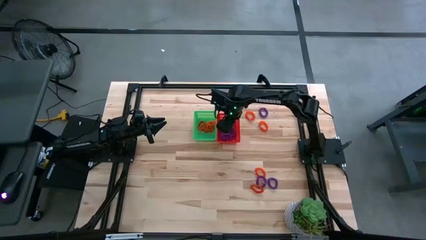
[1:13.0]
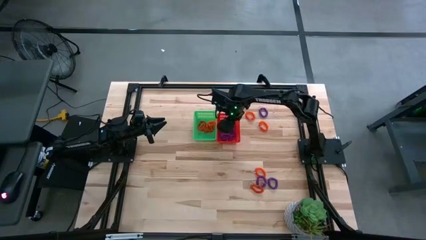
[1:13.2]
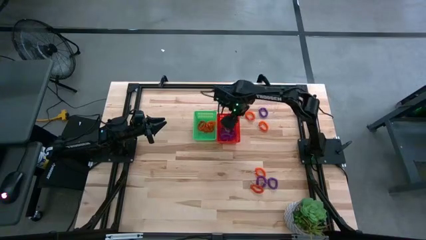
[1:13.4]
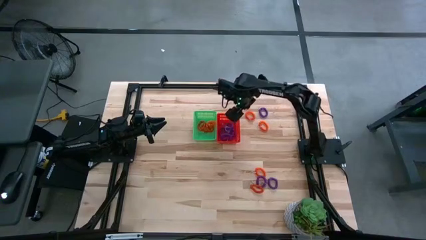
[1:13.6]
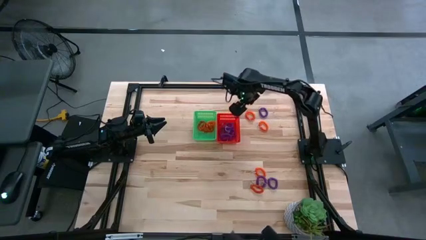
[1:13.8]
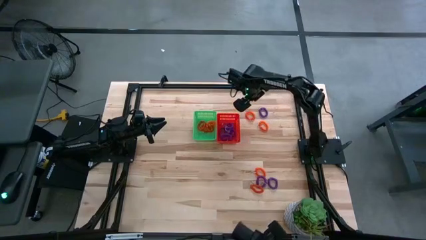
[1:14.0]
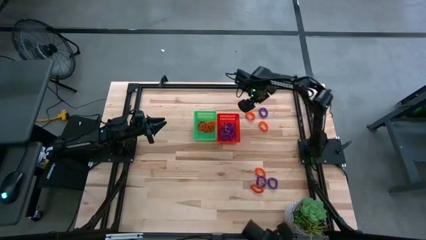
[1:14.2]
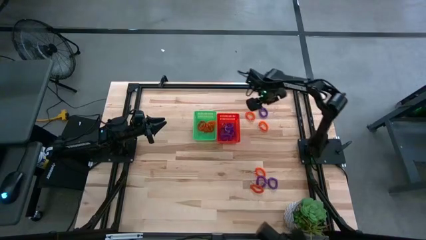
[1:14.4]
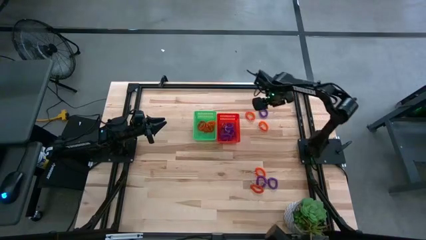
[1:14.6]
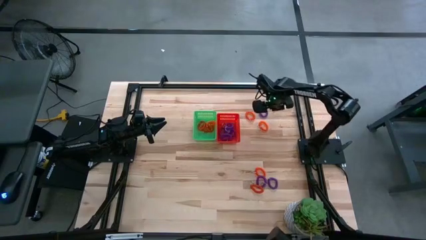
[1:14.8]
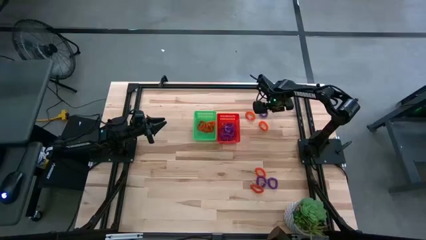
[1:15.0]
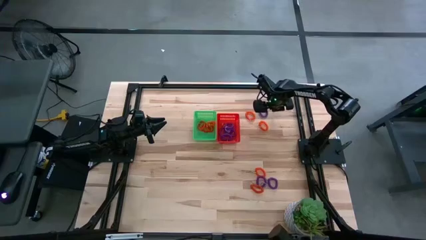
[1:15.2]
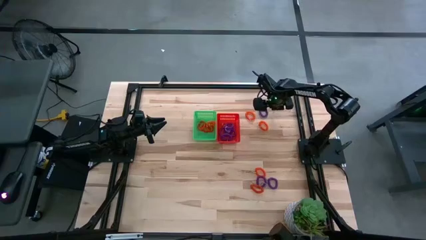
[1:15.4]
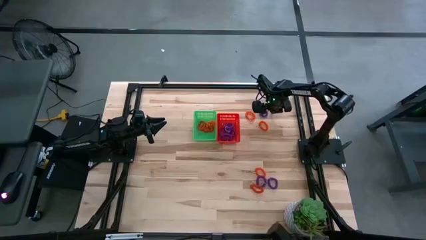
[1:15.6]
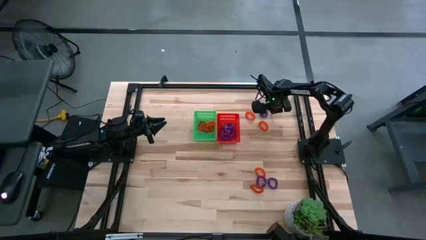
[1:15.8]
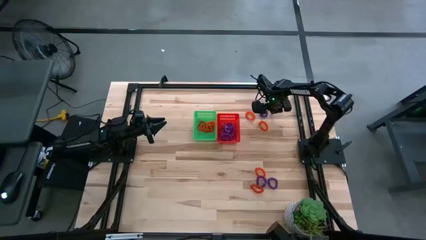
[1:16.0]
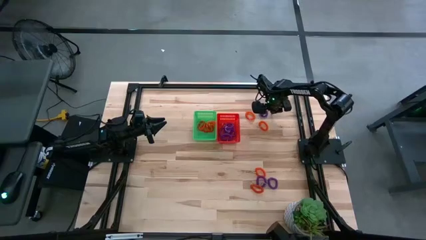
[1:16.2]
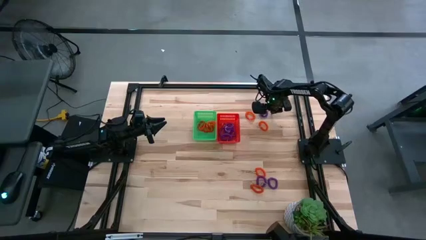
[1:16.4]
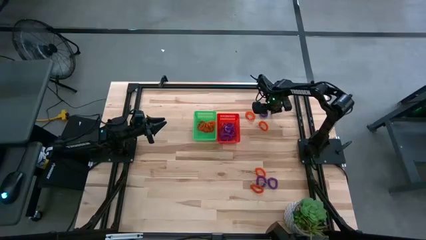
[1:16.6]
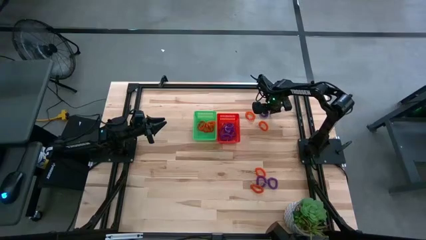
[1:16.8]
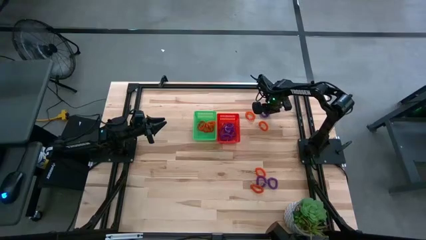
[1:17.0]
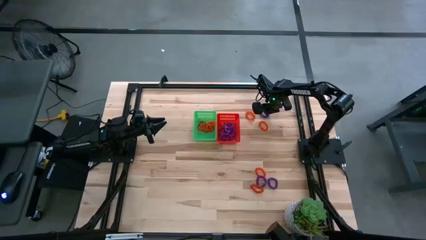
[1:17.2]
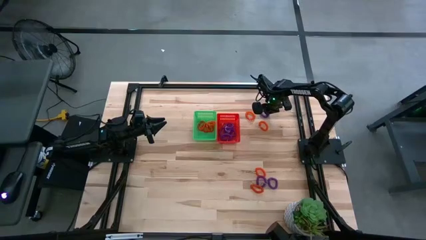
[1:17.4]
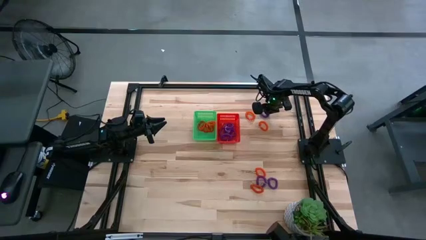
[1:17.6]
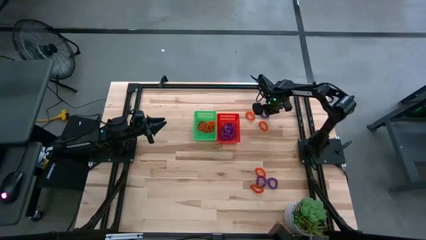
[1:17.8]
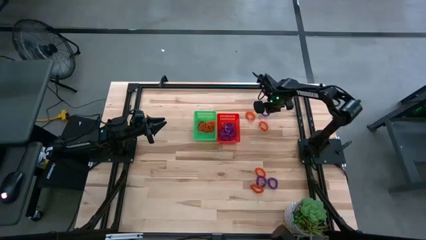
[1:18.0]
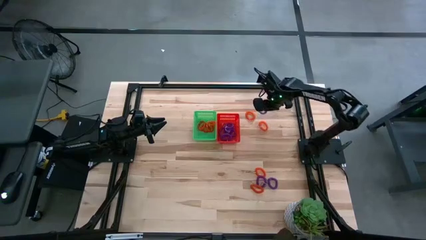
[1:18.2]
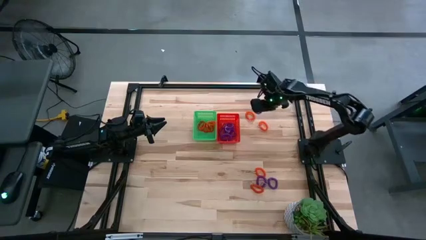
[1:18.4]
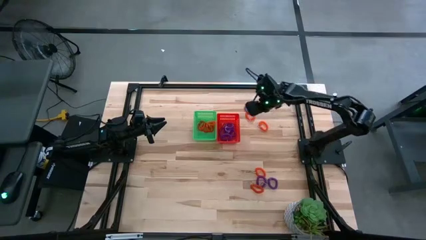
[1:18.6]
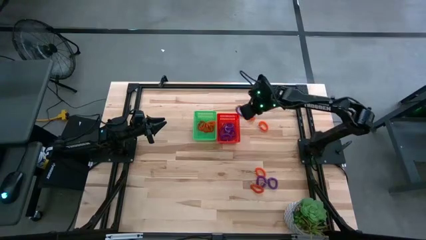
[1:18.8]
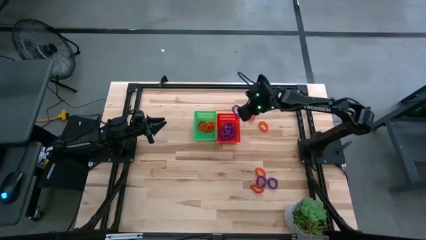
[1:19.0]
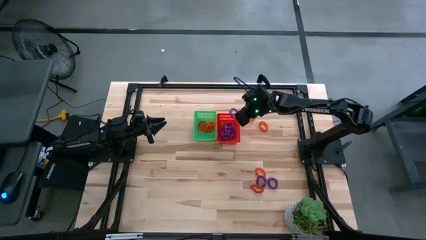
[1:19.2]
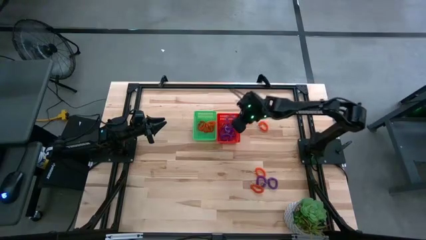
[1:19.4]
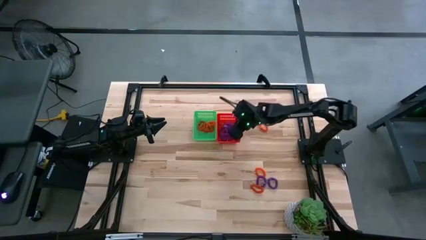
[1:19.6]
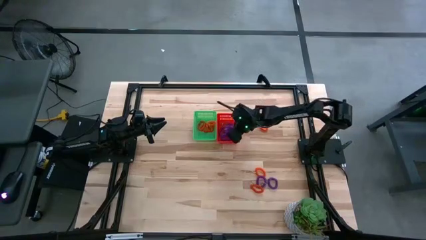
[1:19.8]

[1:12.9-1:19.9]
Task: Sort spring keychains
Put the purple spring keychain into the orange bin

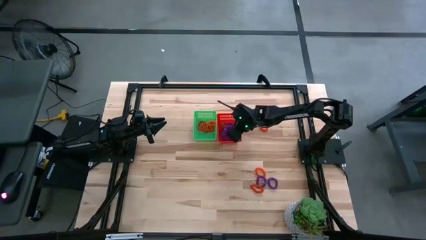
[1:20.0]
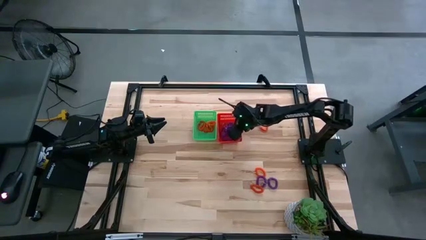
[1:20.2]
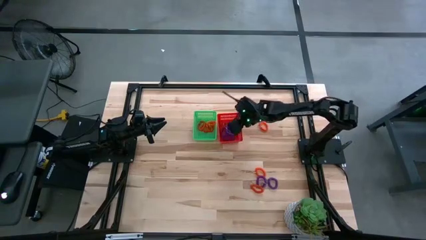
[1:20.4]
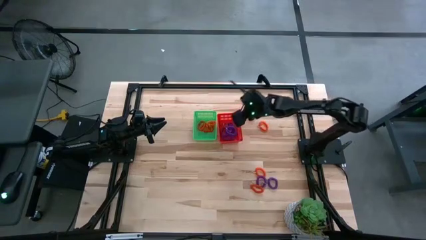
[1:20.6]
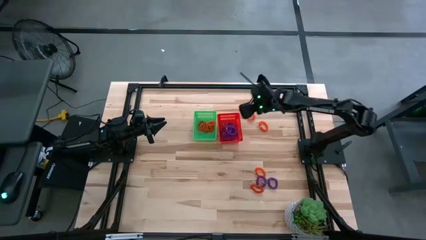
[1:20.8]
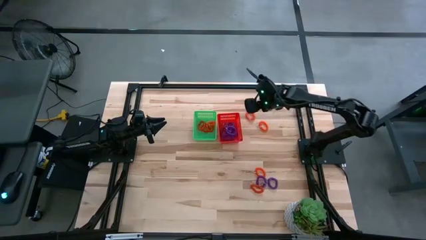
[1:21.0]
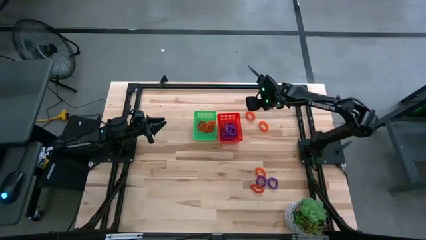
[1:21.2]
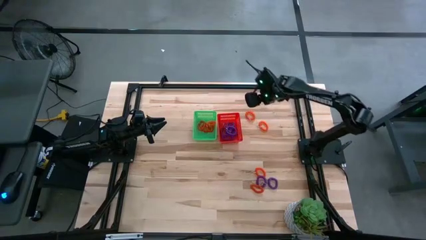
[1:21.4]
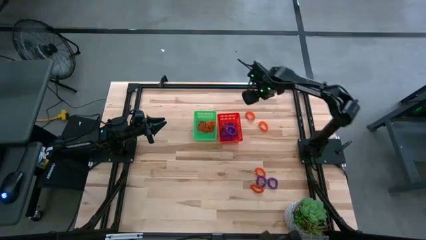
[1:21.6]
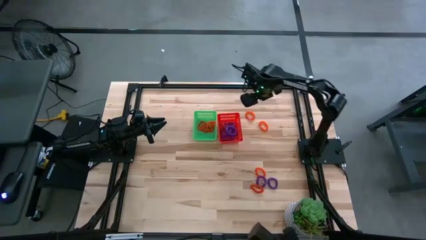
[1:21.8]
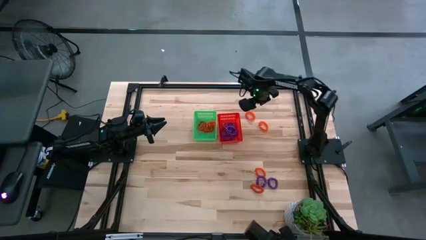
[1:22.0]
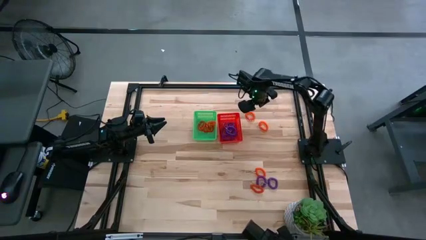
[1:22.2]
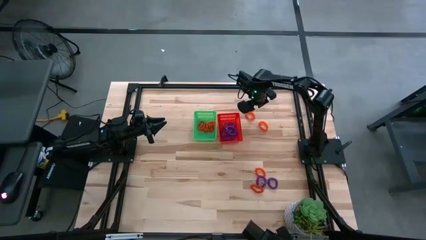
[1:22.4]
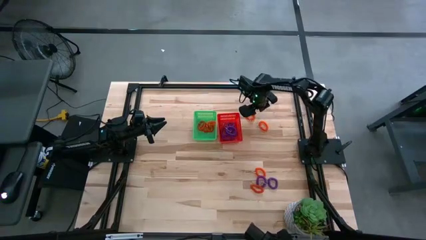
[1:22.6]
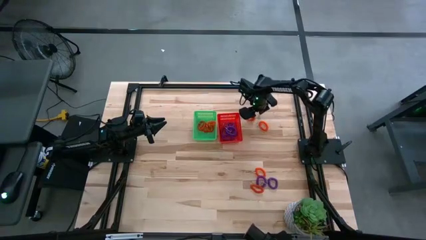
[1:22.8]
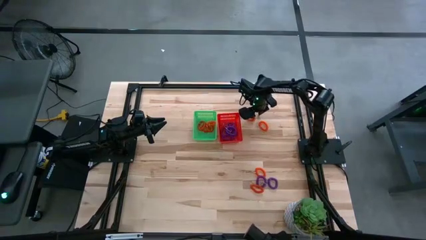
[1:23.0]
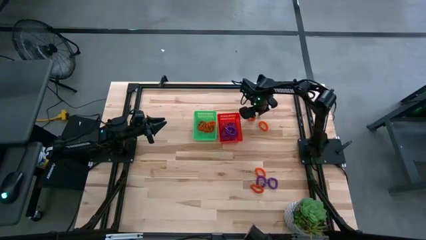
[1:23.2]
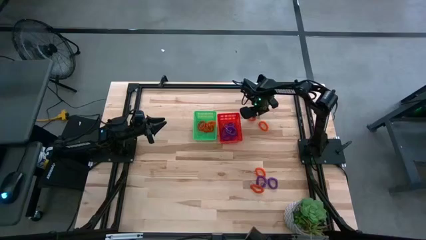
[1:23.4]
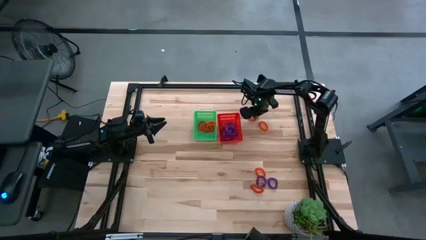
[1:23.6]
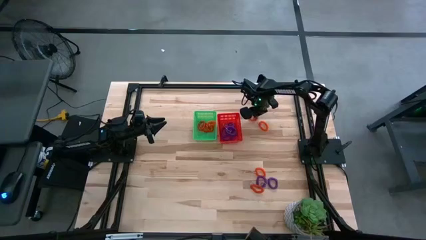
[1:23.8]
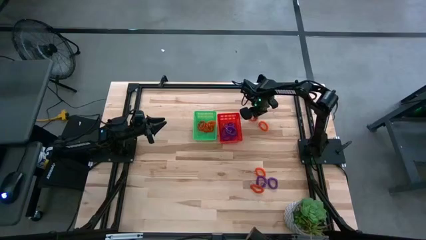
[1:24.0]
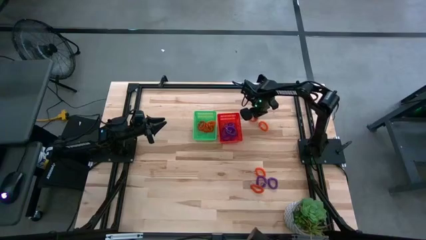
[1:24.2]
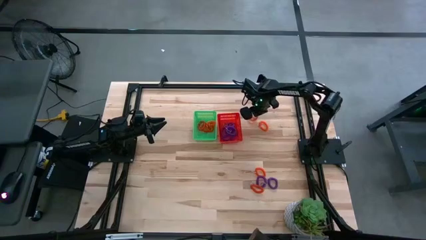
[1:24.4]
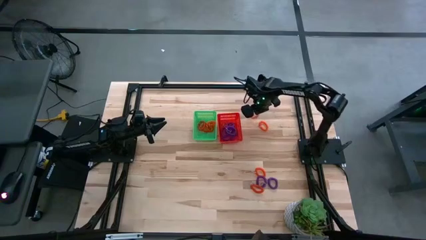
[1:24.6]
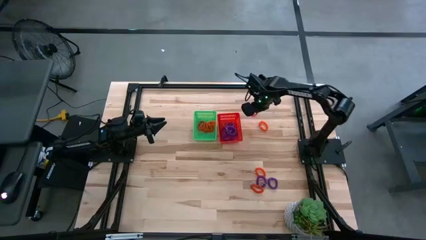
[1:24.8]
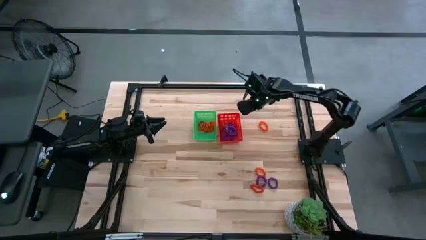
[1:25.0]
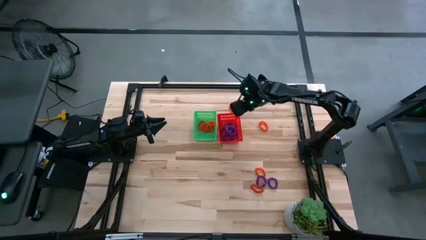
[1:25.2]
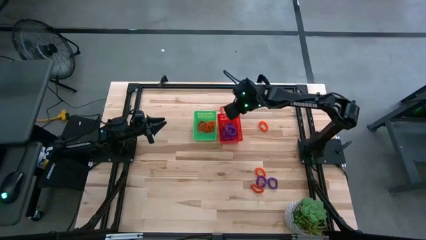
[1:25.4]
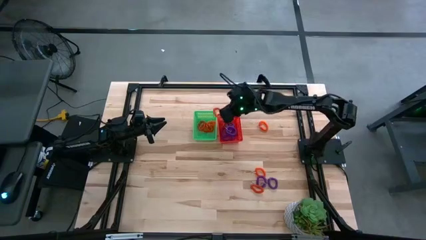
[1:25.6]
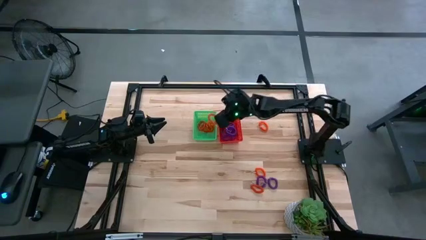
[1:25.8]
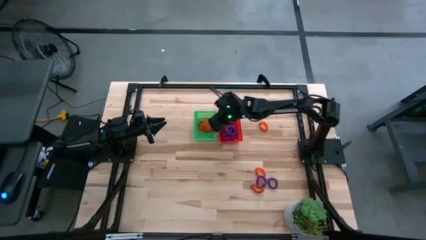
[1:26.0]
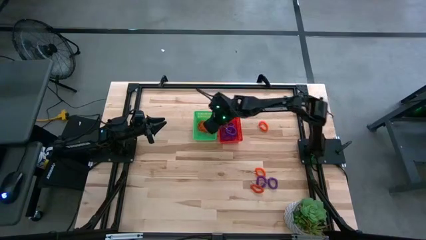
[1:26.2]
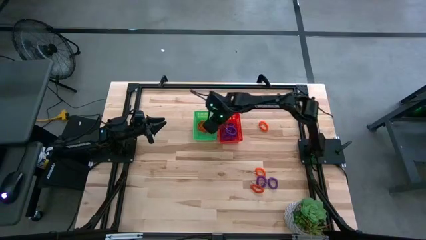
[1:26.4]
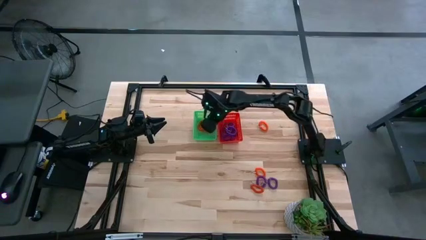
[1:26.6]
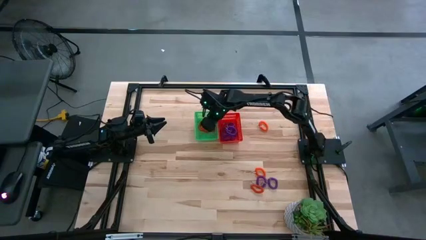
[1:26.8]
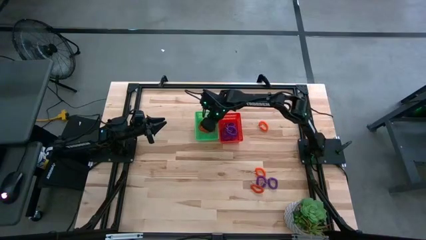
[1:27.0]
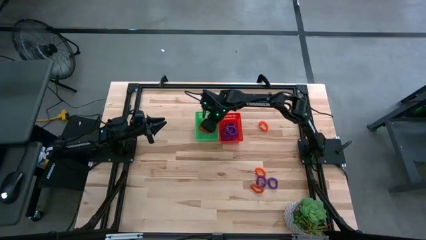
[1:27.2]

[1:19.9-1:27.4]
Put the orange spring keychain into the green bin
